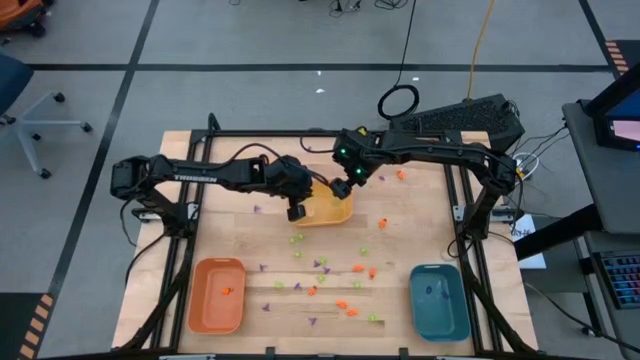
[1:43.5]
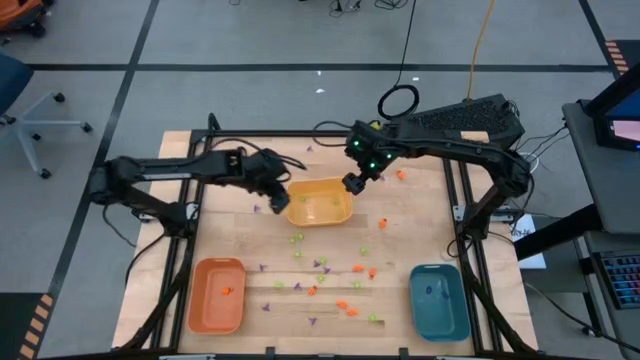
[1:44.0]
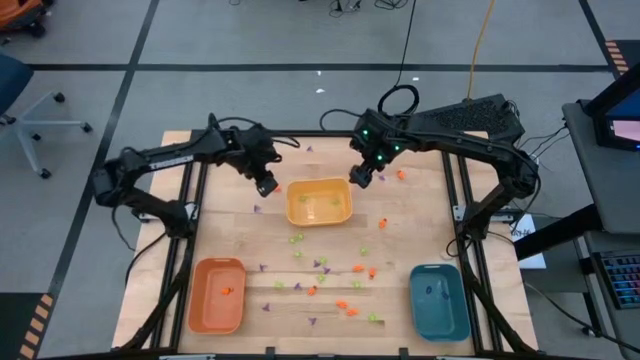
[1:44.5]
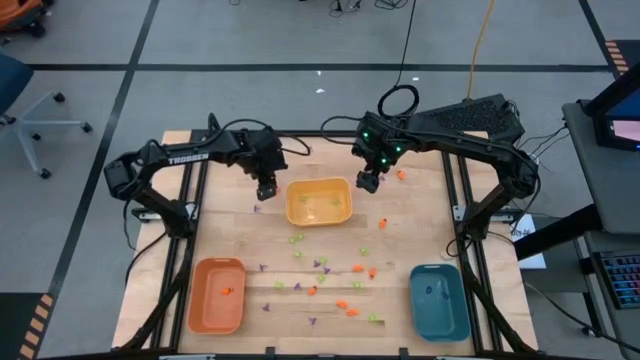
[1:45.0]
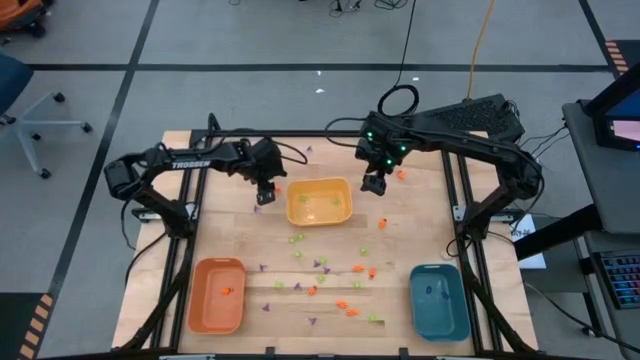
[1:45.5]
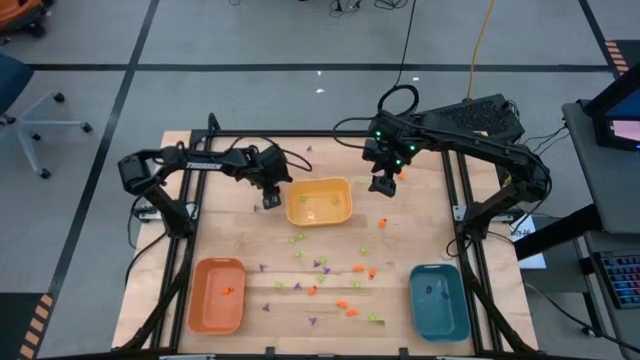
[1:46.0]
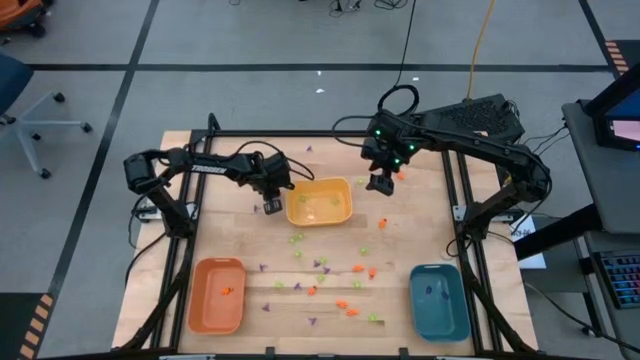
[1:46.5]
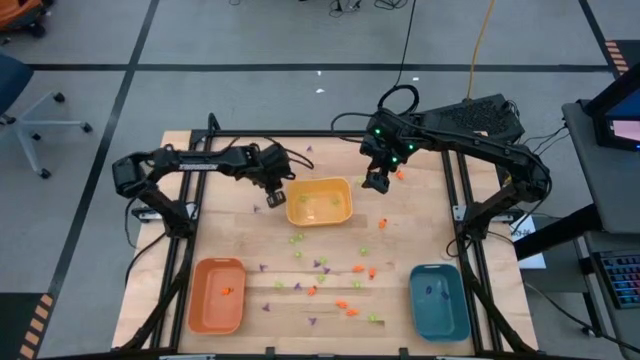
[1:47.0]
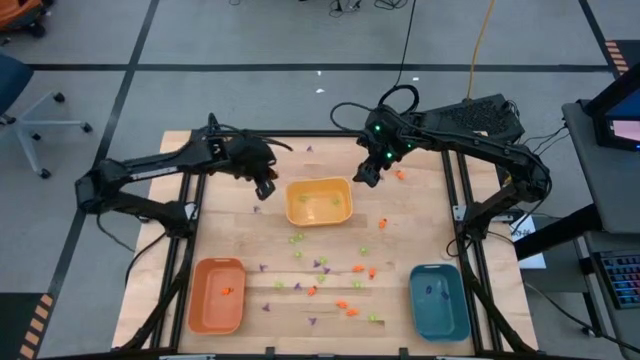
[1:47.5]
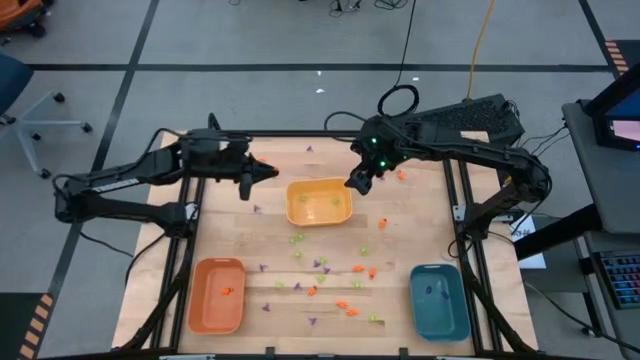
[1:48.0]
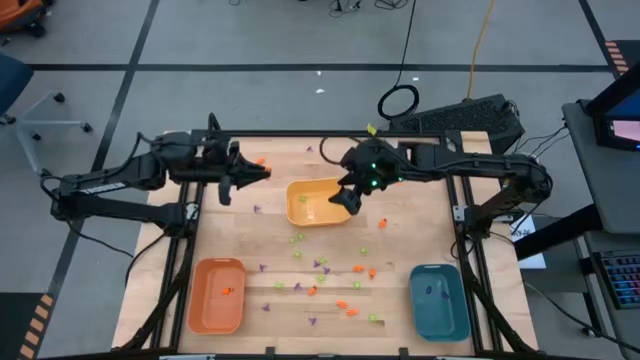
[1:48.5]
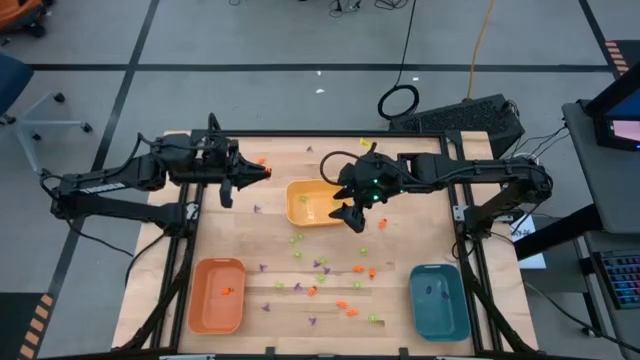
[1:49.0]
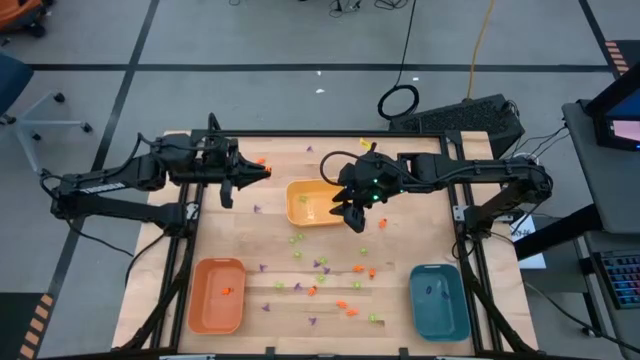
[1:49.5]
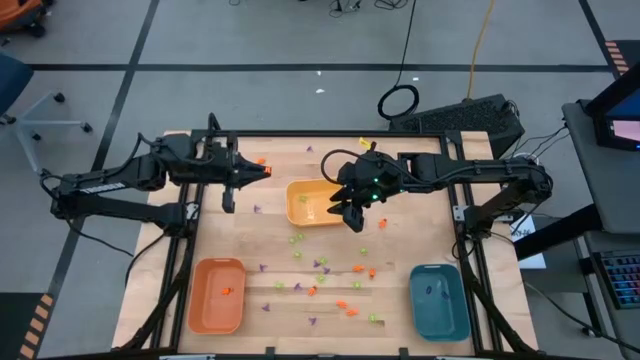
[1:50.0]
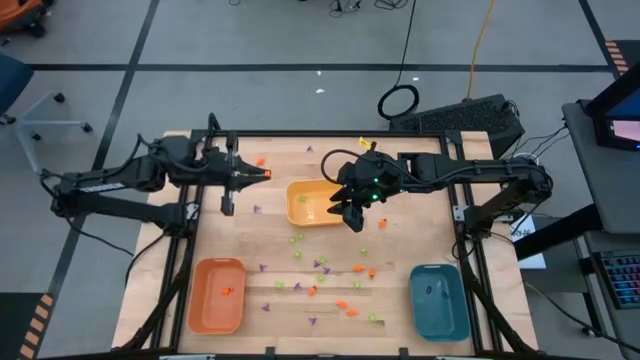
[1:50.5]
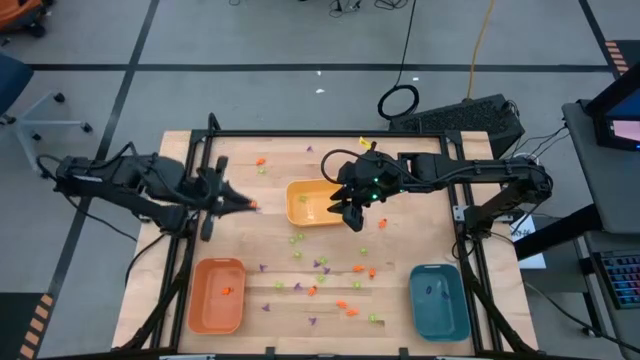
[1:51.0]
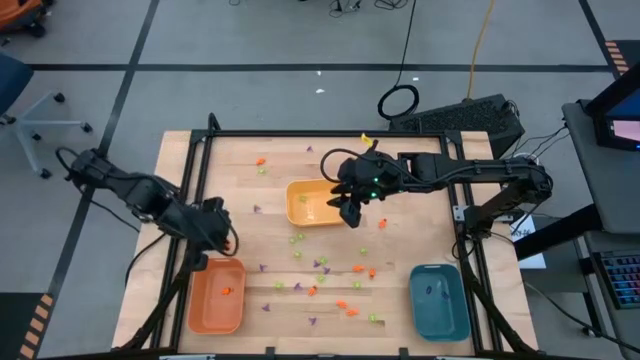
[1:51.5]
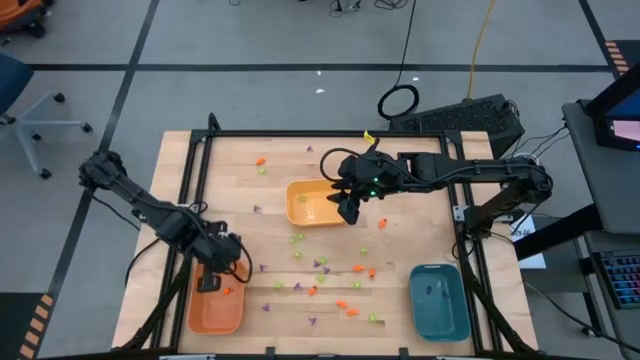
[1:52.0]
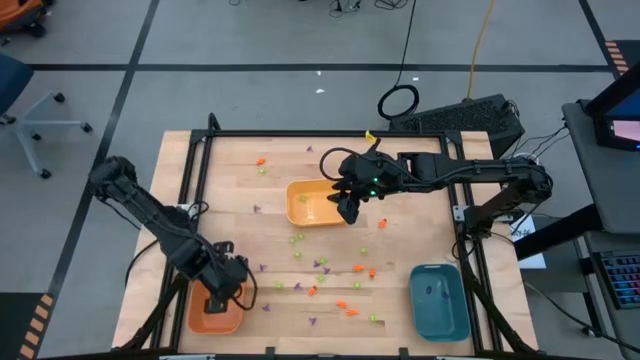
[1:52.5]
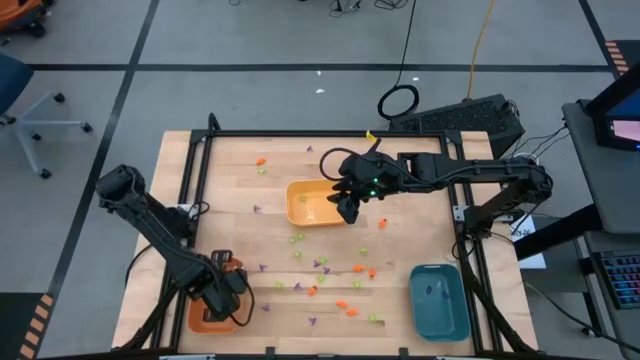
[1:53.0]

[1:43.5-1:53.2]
Task: Sort Halloween decoration
Put the orange skeleton toy into the orange bin

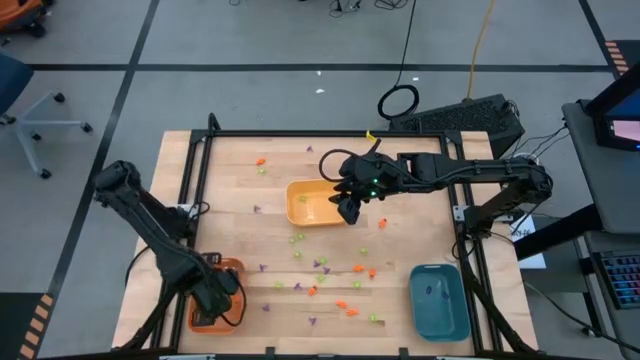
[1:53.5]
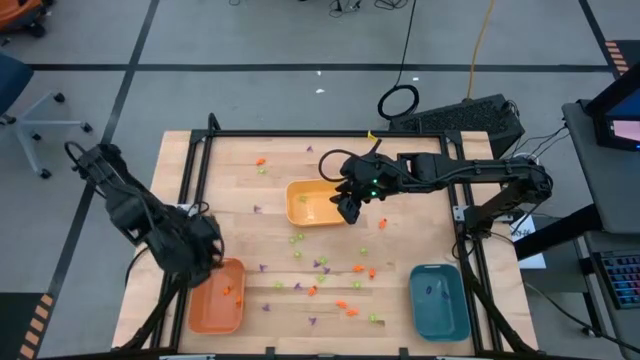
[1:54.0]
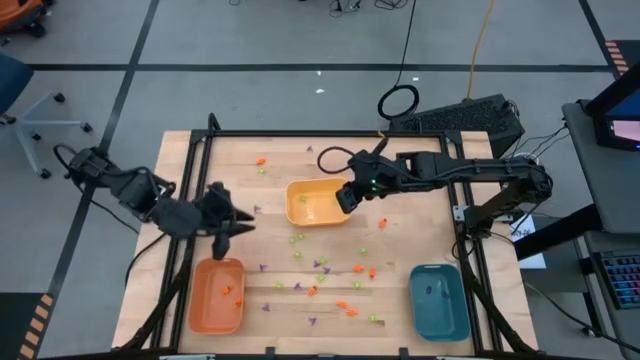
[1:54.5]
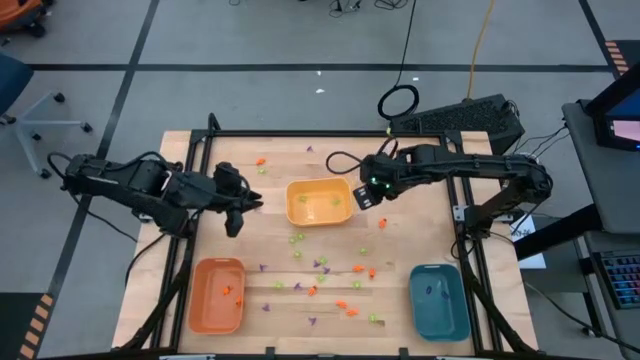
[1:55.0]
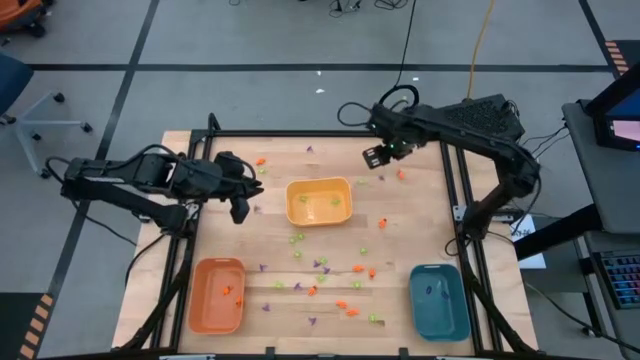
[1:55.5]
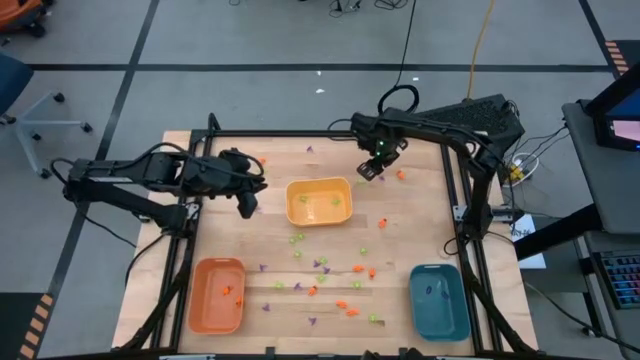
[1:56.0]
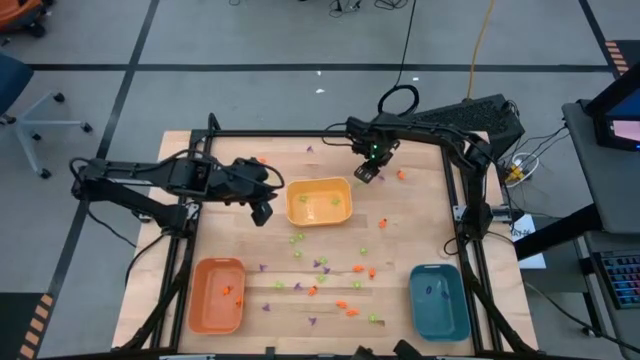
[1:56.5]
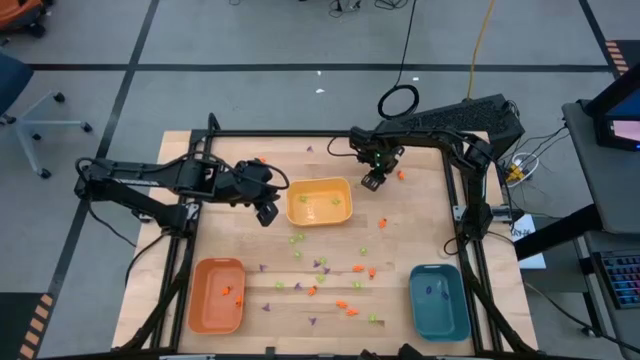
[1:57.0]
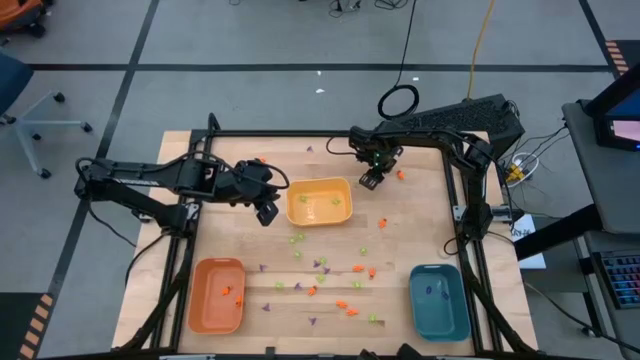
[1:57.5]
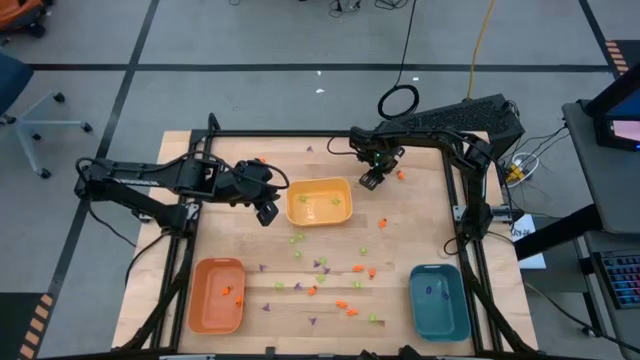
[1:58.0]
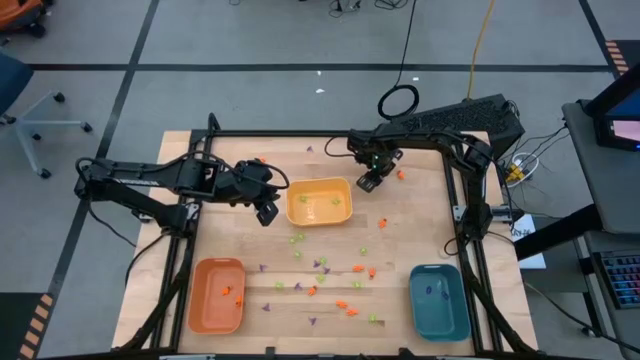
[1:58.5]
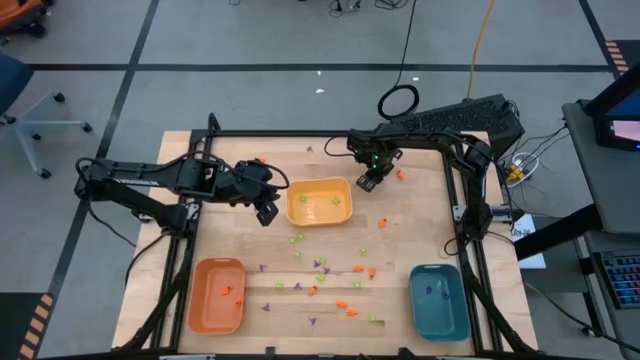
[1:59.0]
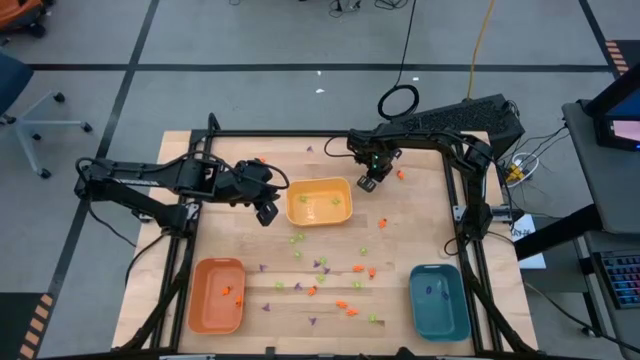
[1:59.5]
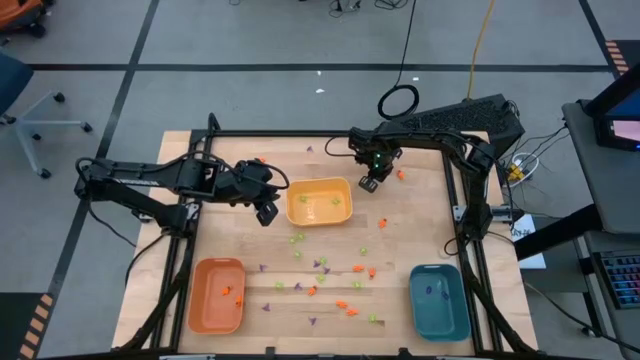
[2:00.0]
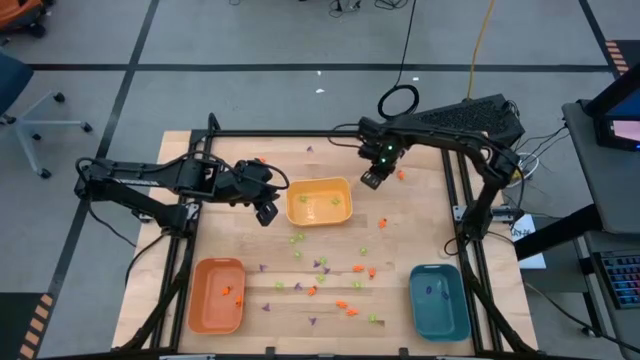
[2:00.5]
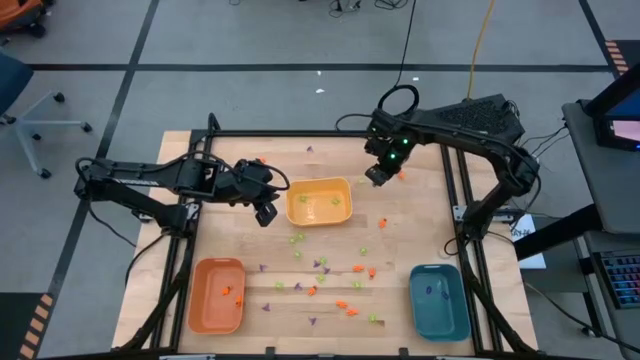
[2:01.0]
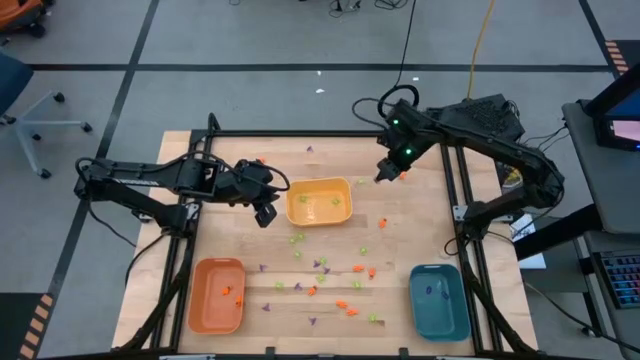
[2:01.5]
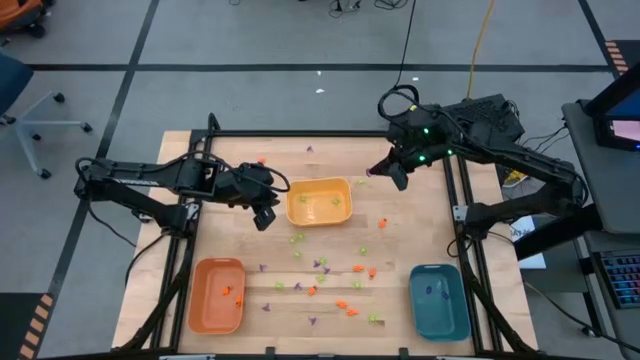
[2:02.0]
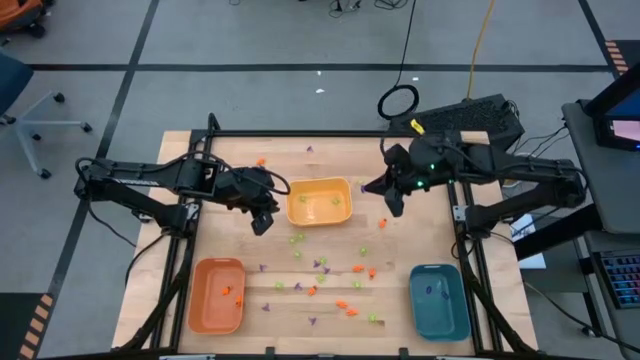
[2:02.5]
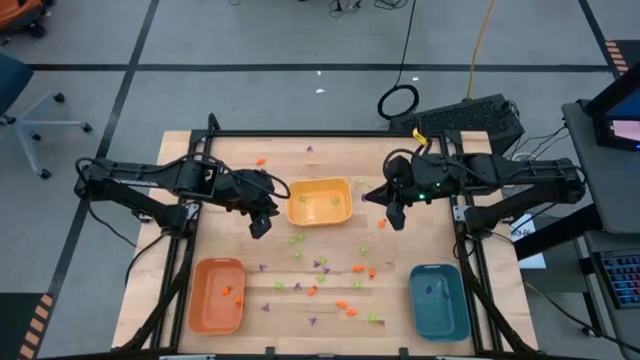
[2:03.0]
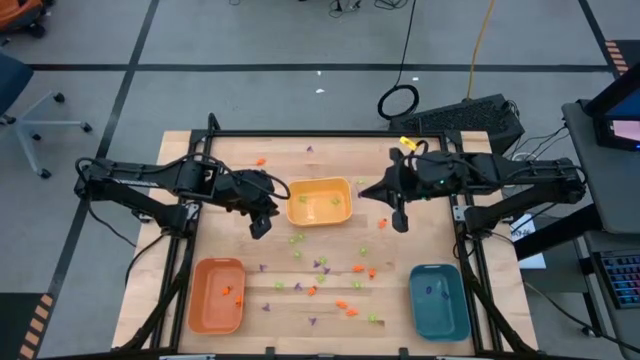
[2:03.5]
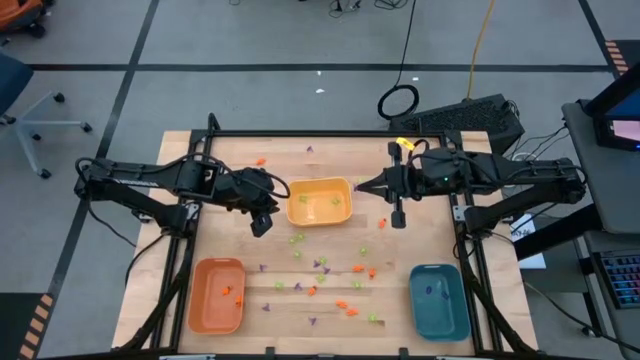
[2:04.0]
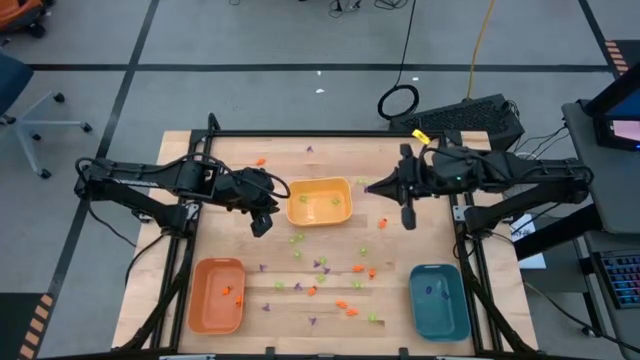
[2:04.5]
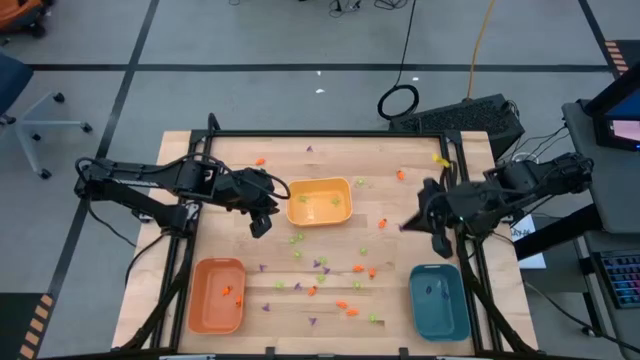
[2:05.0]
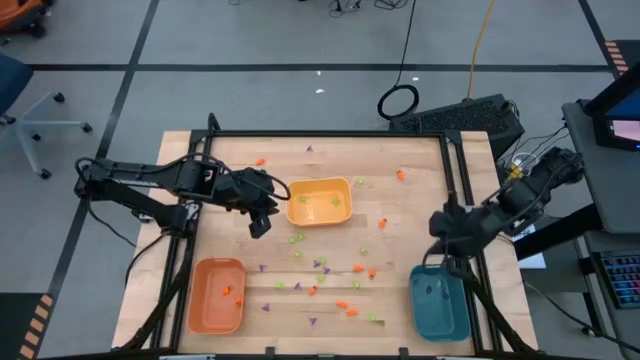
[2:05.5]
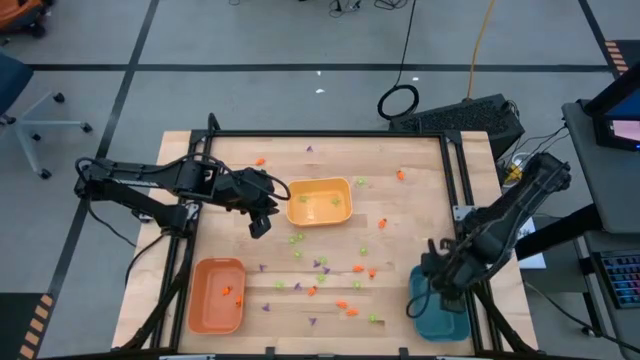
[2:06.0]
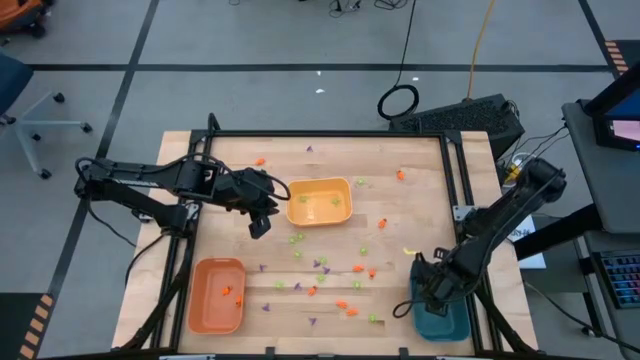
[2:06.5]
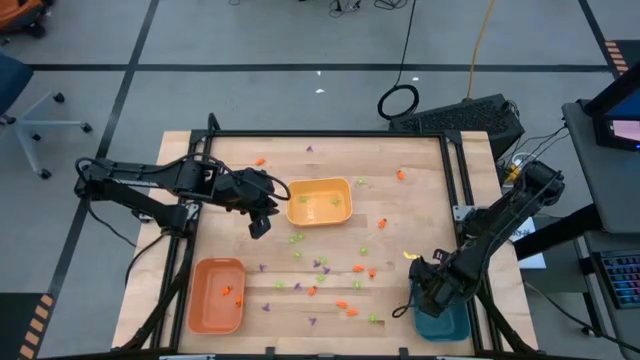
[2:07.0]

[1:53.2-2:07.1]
Put the violet witch hat toy into the blue bin
